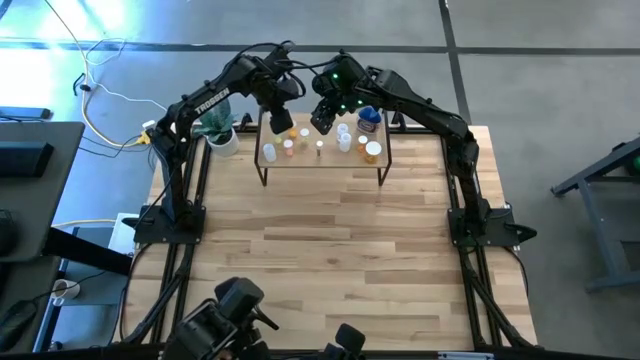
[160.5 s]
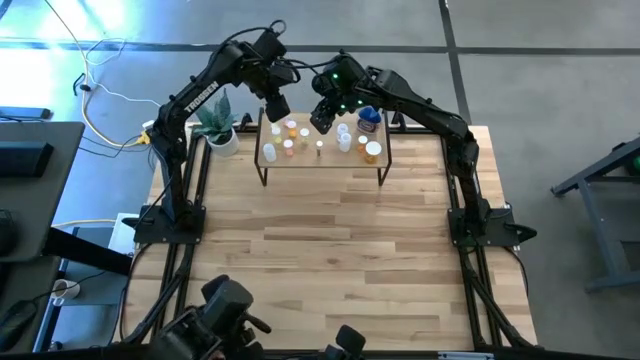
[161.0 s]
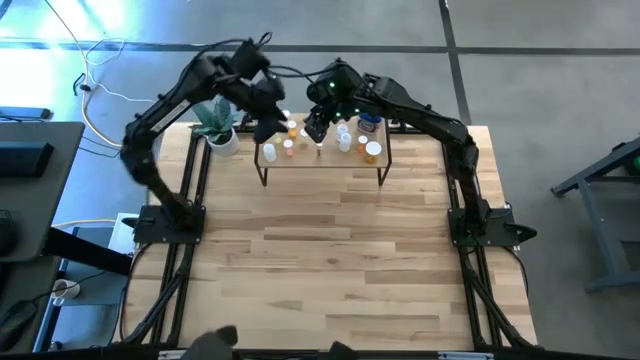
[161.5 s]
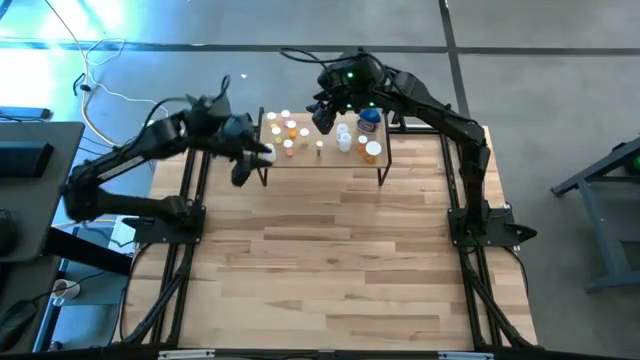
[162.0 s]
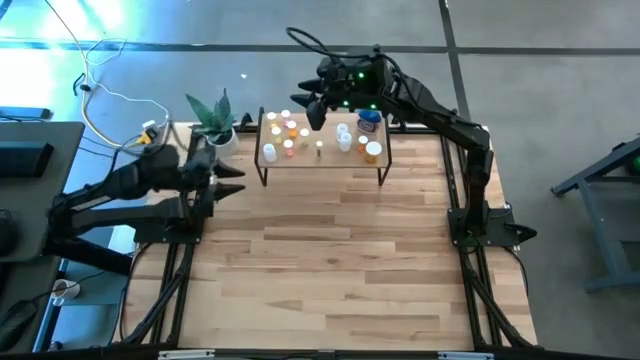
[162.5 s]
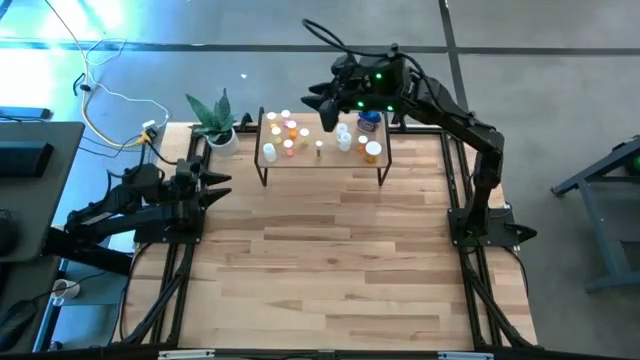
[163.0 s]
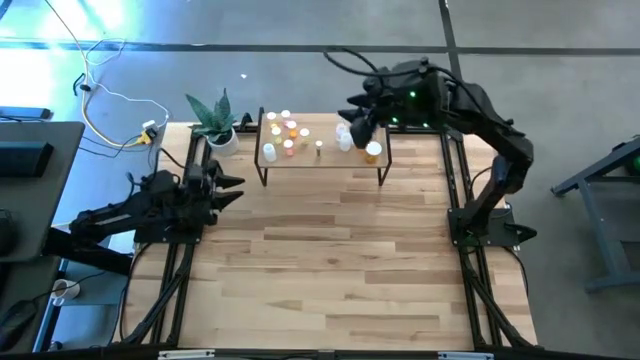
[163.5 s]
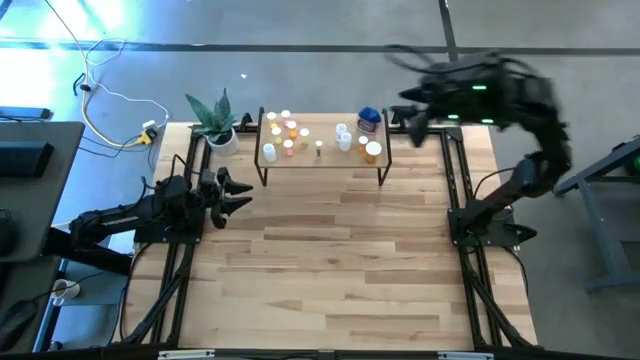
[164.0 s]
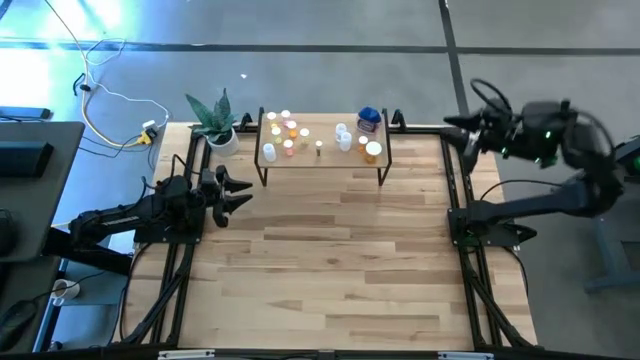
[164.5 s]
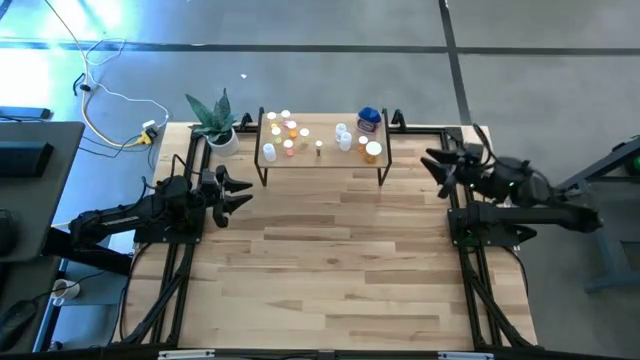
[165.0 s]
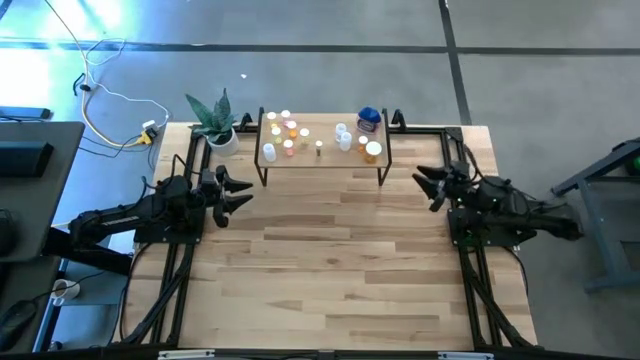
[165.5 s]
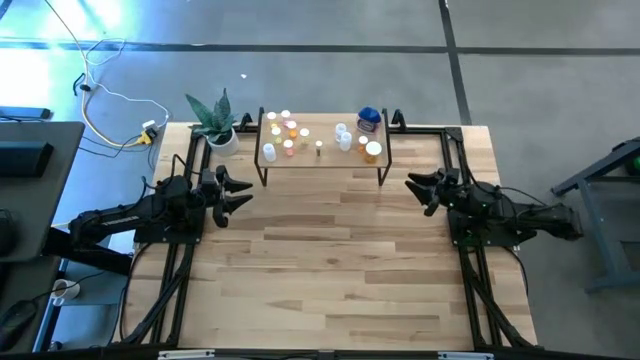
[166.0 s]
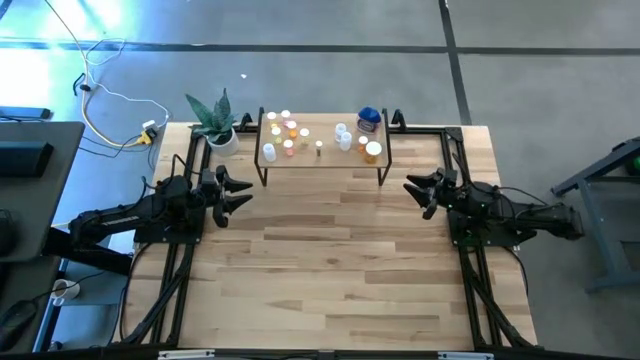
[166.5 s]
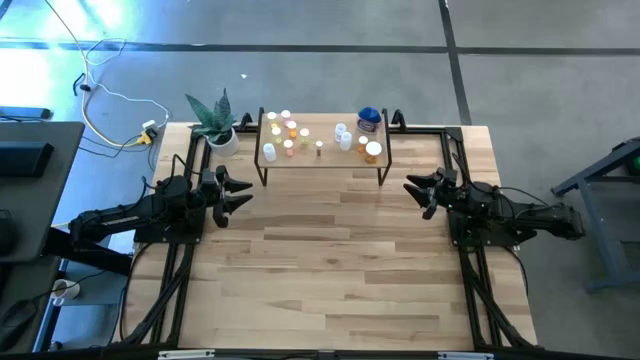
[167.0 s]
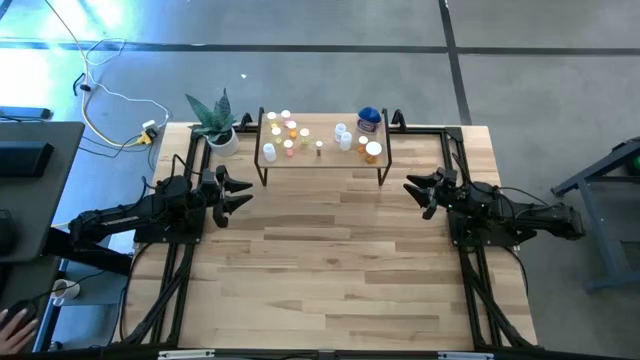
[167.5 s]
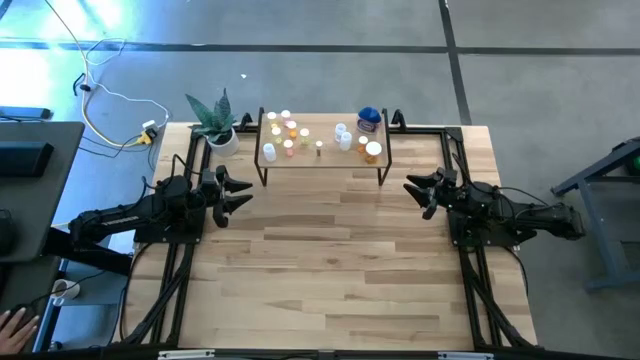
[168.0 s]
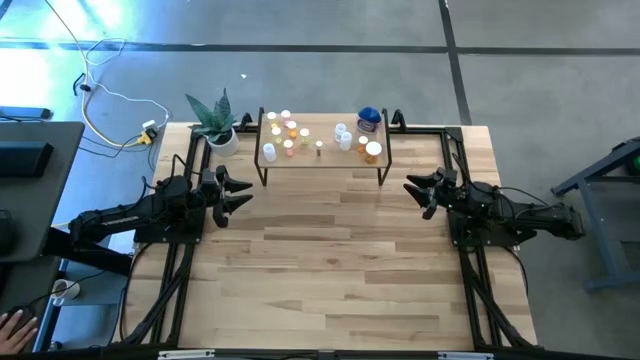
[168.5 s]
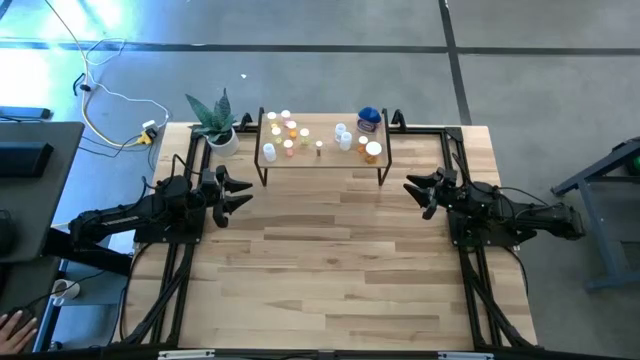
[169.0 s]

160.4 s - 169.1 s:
Task: Pick and place medicine bottles onto shelf by color
Return to Home Position

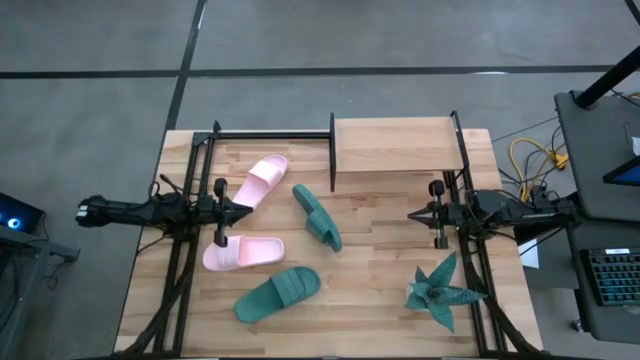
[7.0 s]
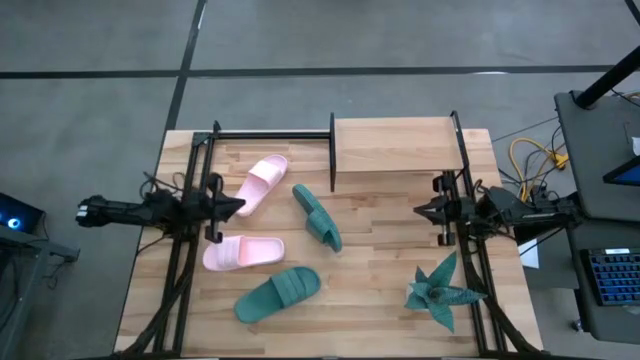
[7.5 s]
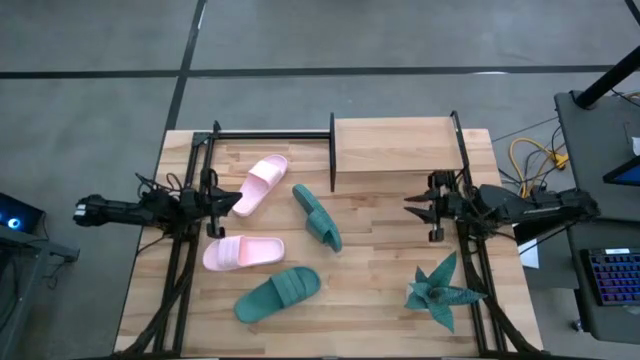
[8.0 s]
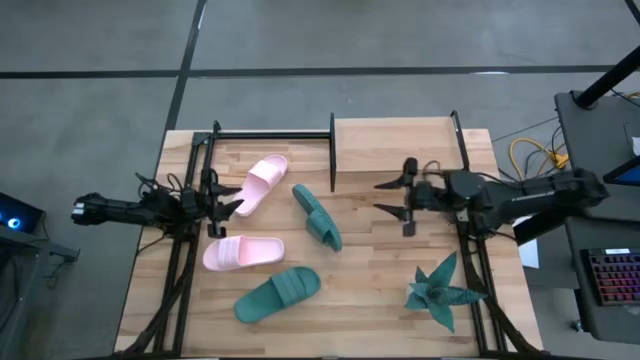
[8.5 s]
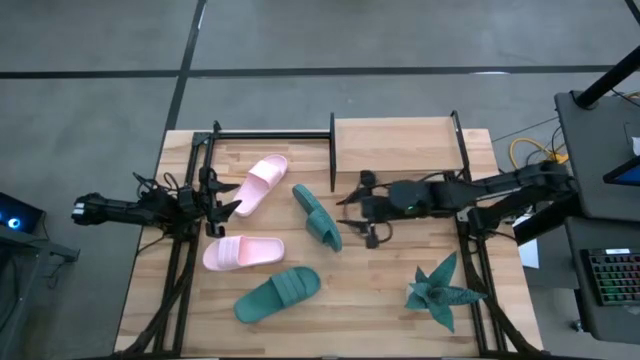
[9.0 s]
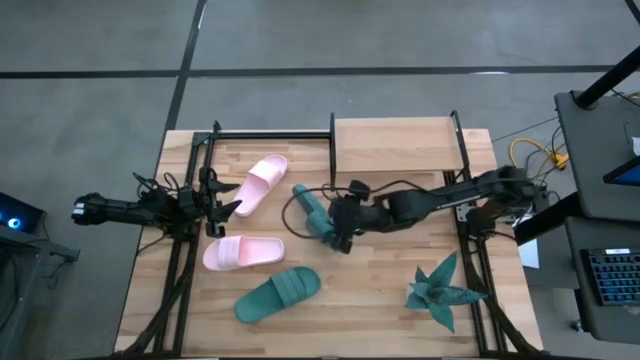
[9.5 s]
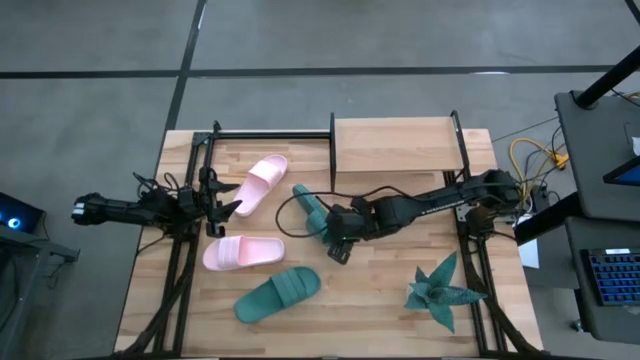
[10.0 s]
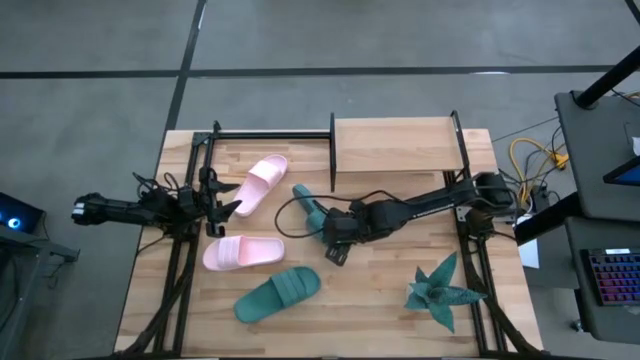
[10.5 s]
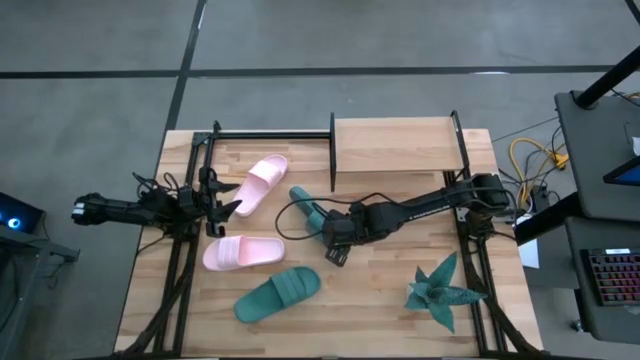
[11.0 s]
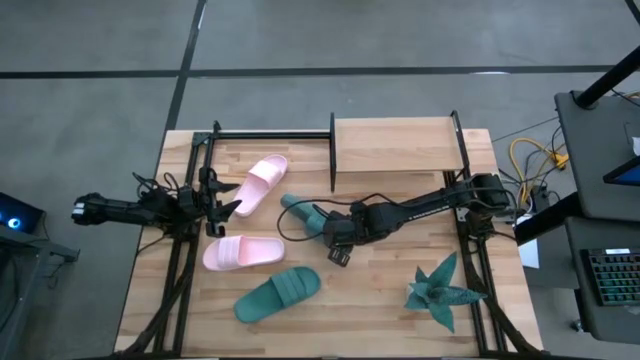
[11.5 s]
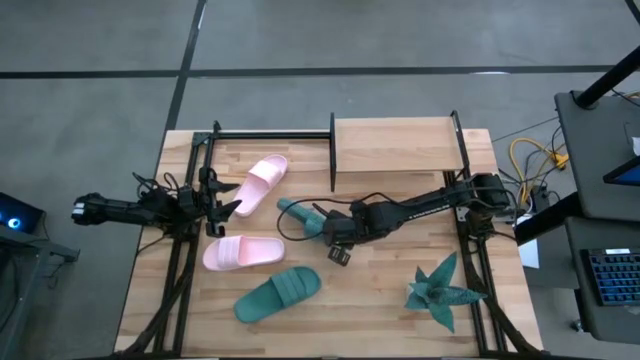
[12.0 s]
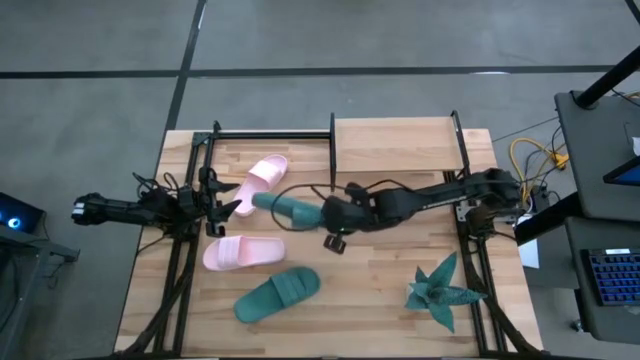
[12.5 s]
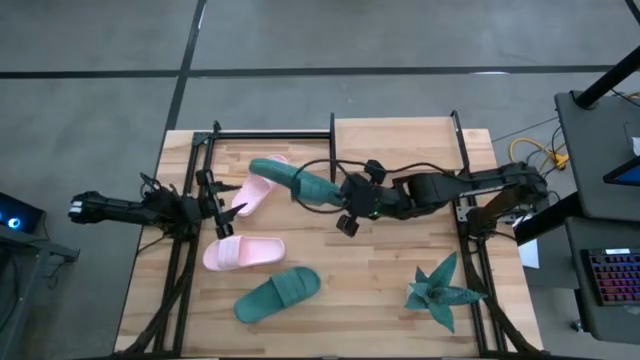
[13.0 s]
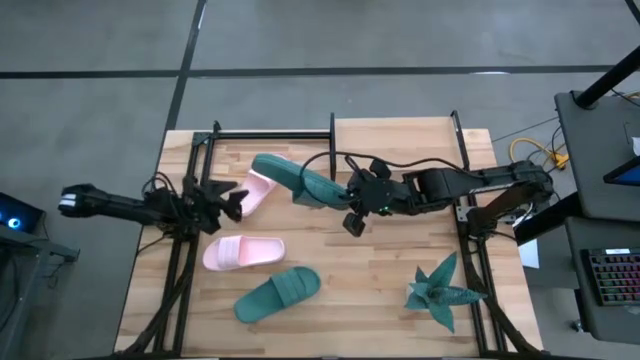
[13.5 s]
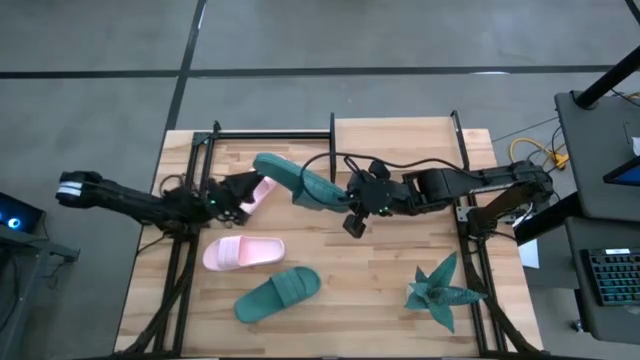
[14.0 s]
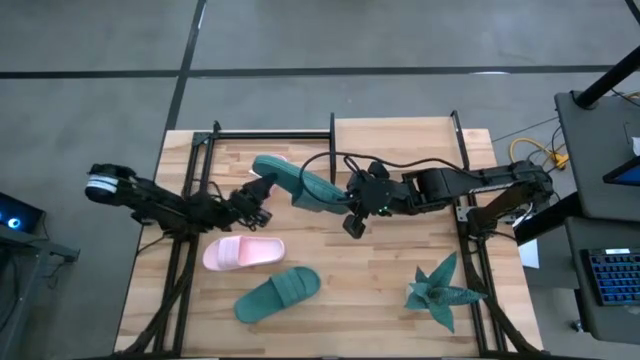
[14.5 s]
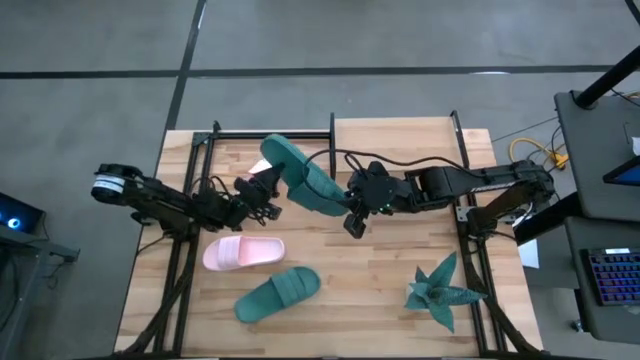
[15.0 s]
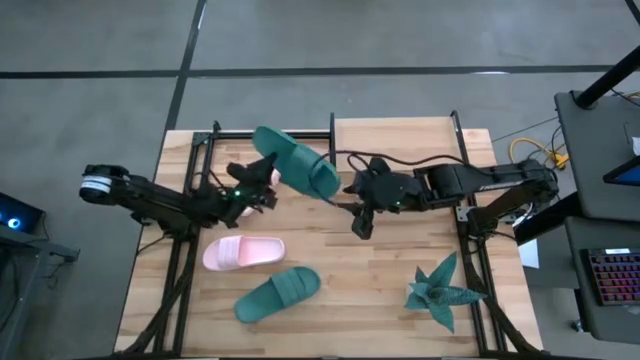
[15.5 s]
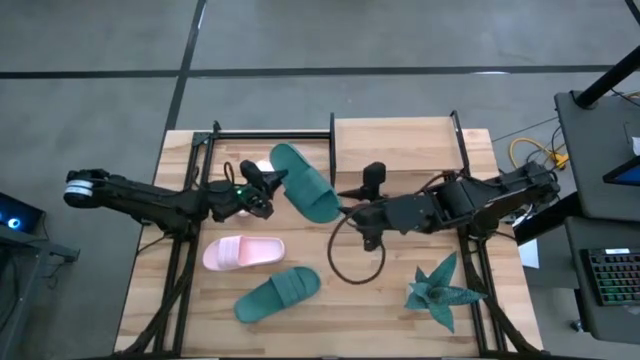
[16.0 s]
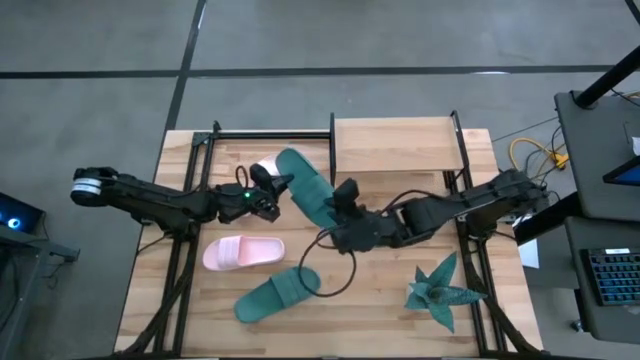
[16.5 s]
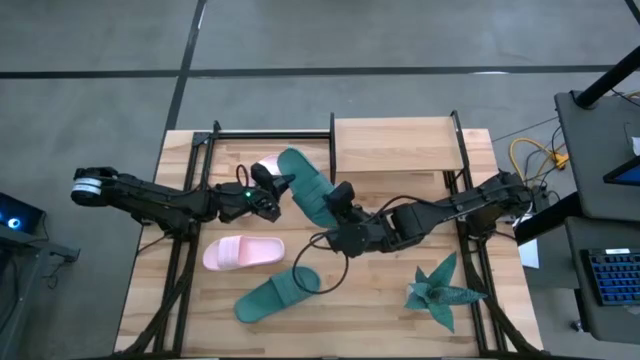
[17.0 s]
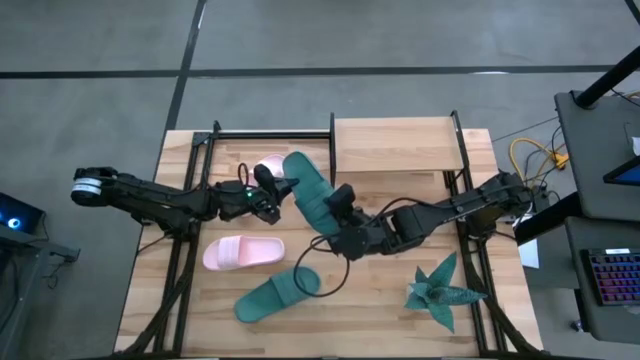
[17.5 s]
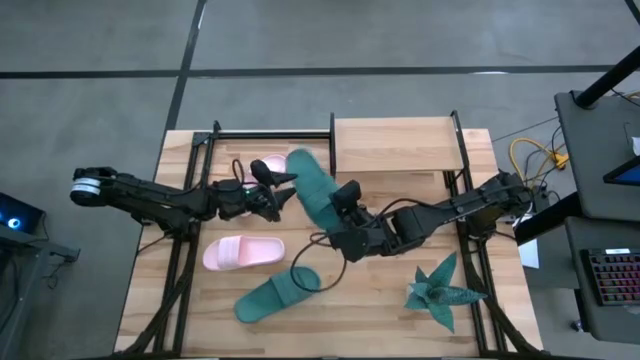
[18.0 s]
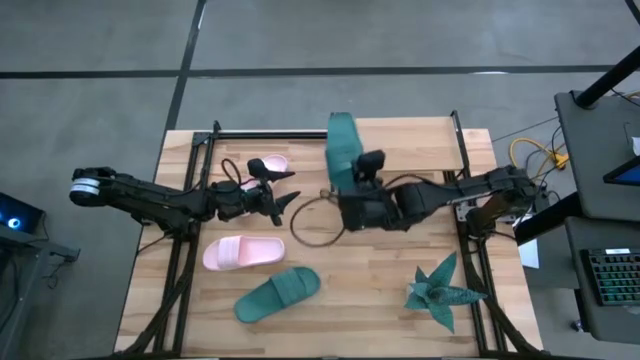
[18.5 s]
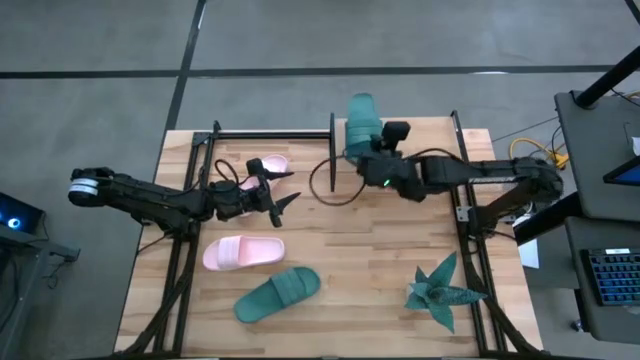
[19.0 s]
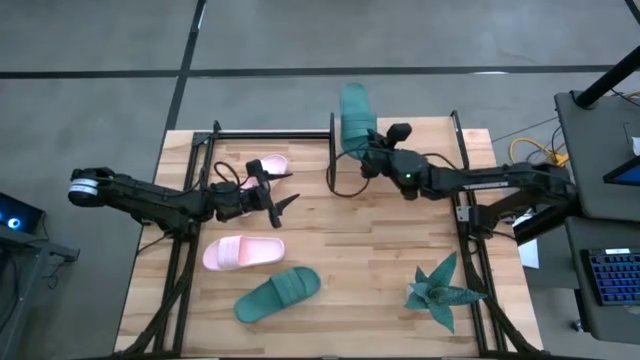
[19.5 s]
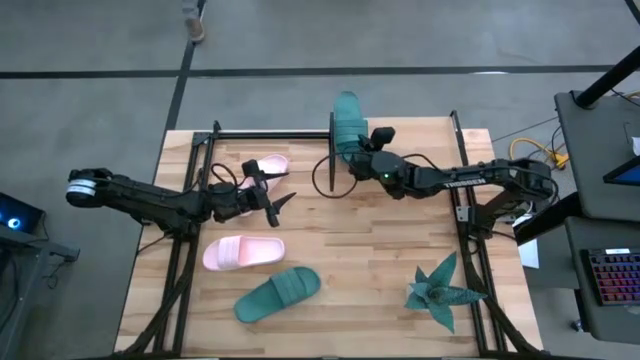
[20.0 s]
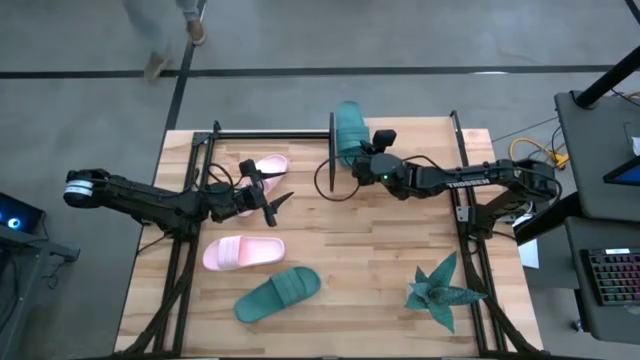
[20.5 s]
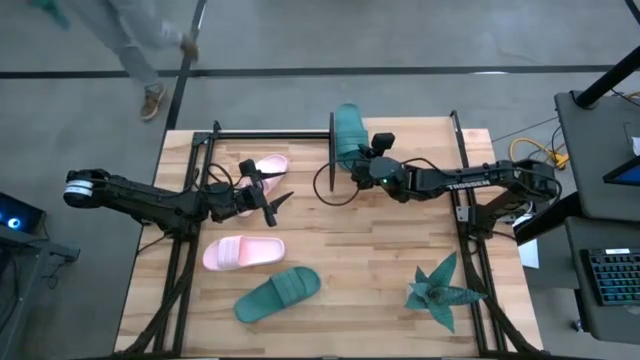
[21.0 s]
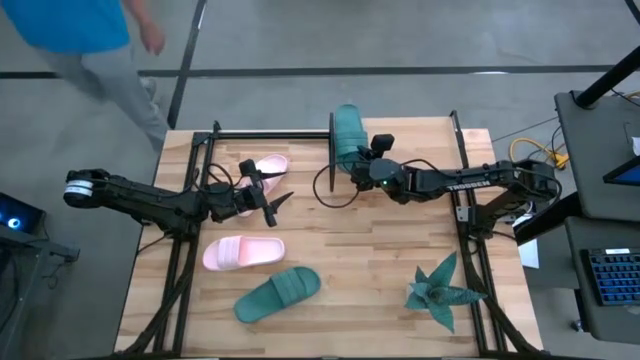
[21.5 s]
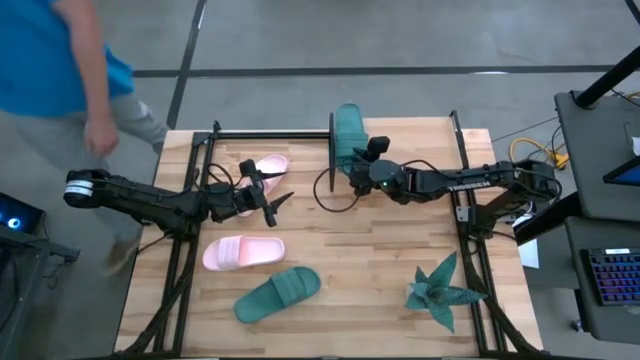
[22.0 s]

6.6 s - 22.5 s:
Task: Pick and place slides into the shelf
Put the top green slipper on the shelf
